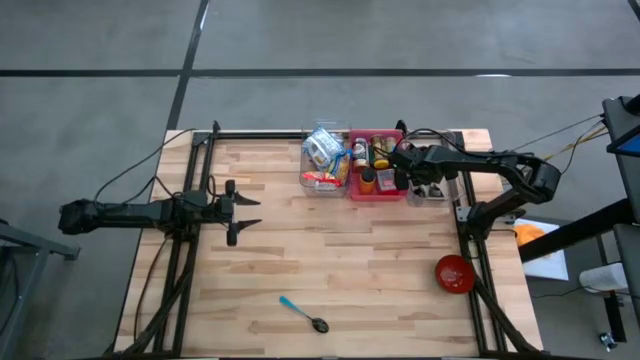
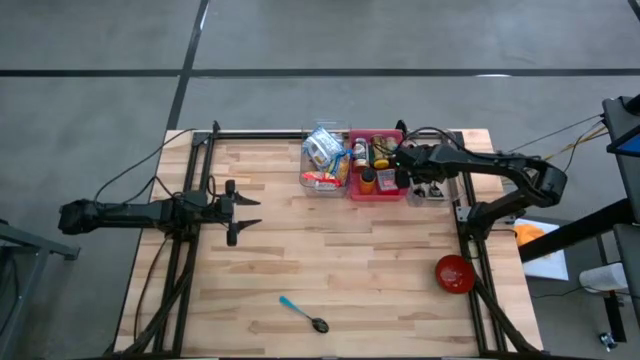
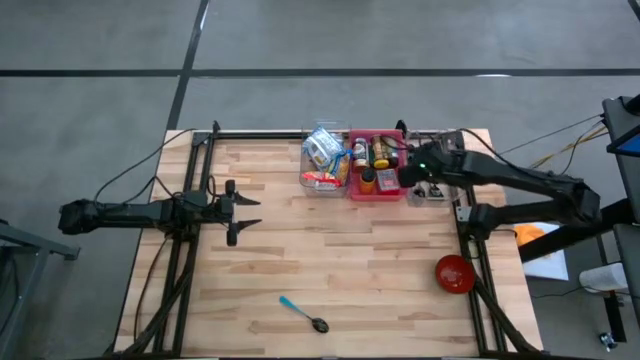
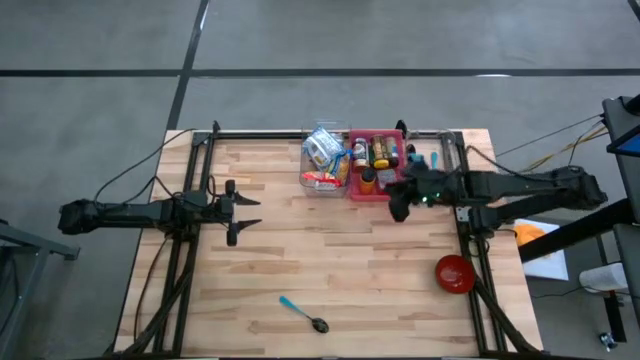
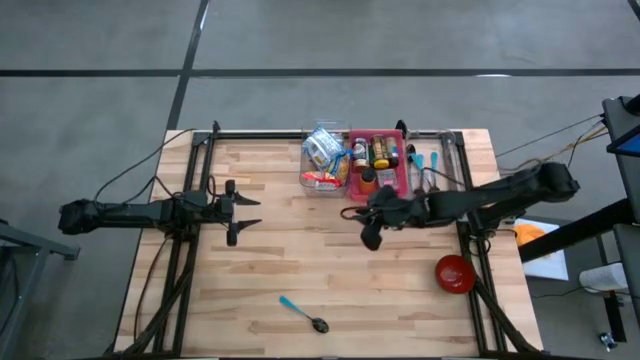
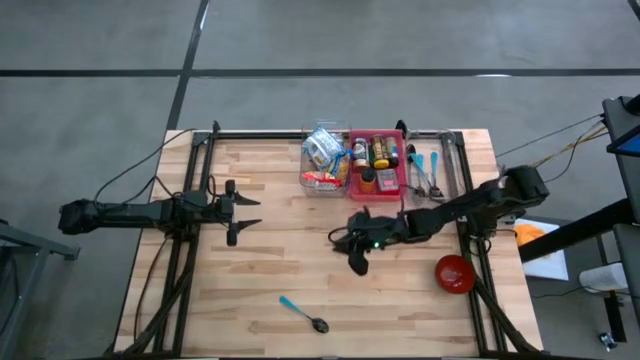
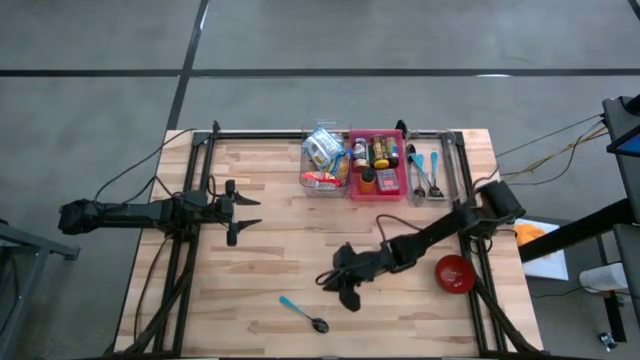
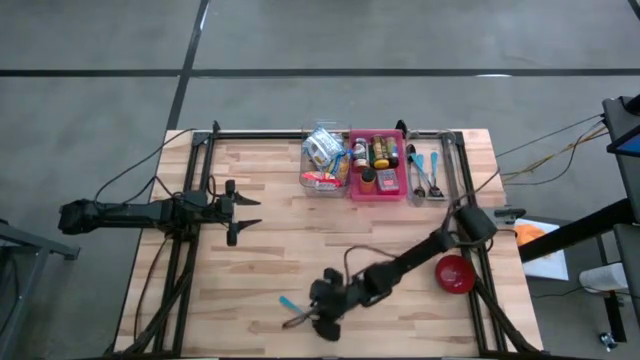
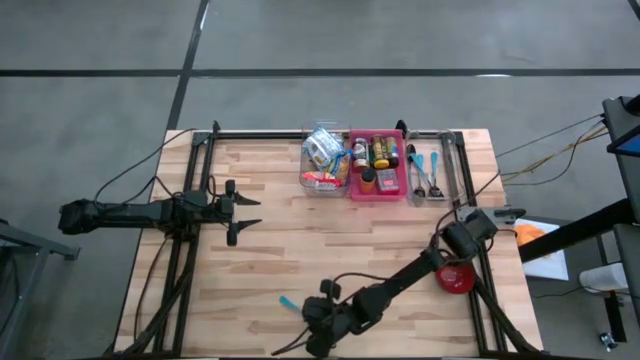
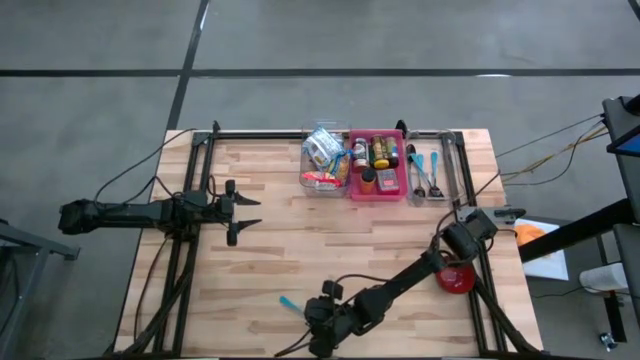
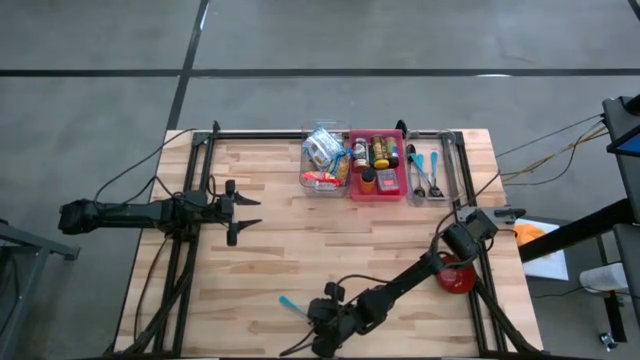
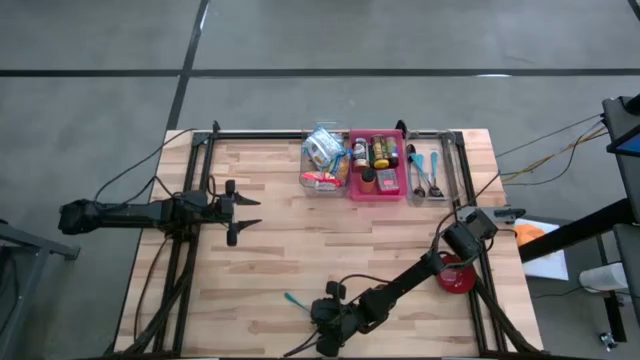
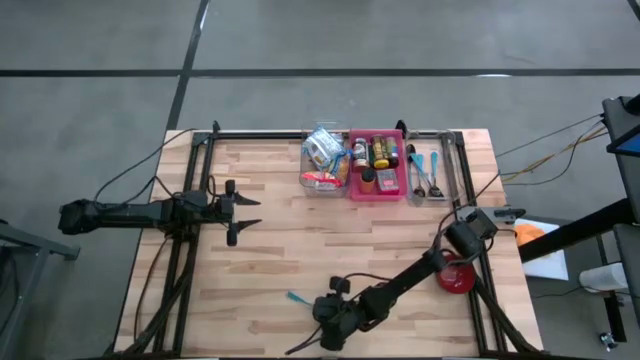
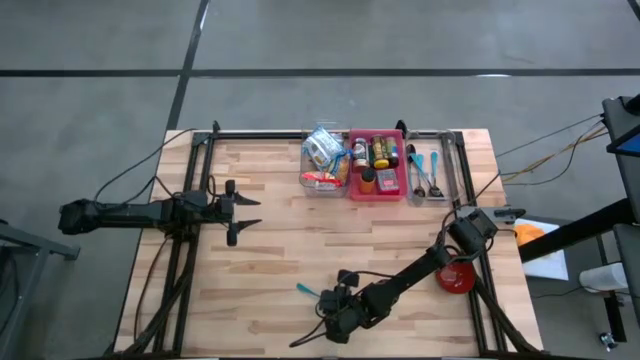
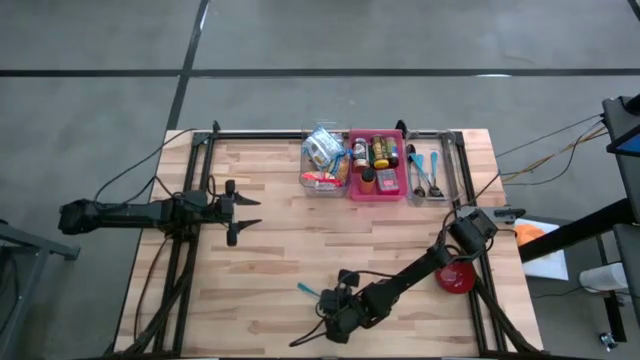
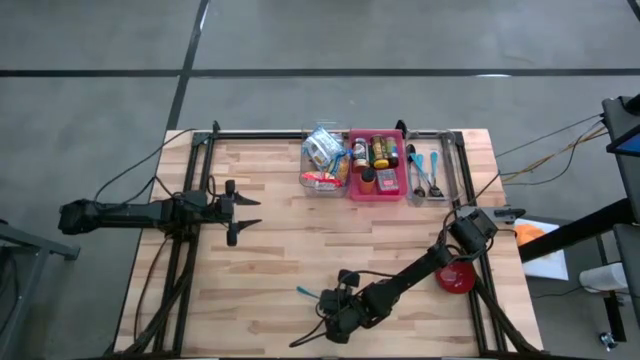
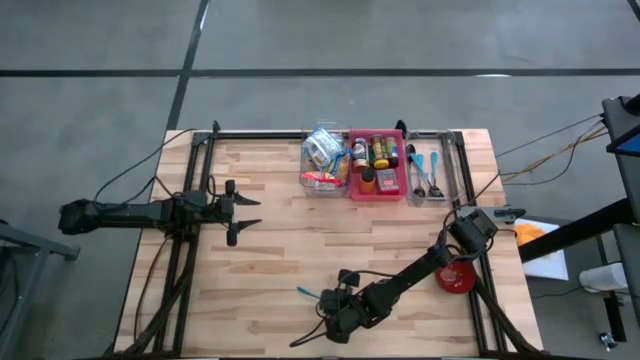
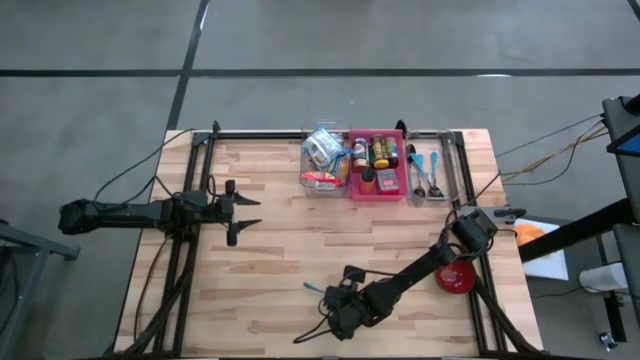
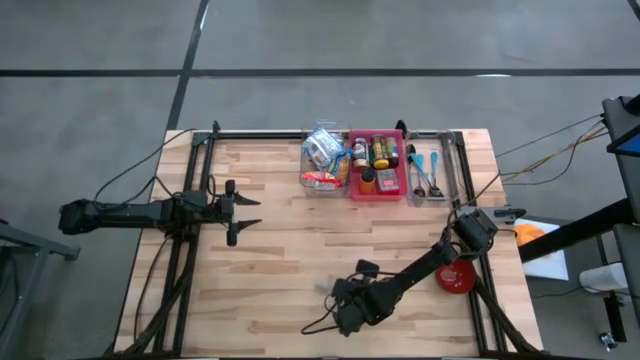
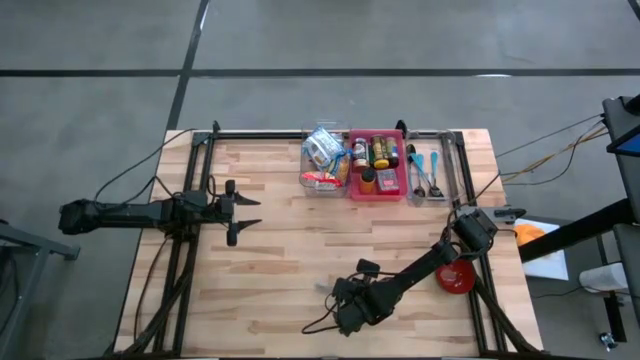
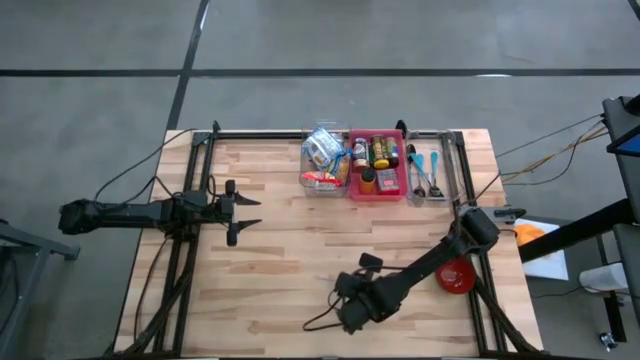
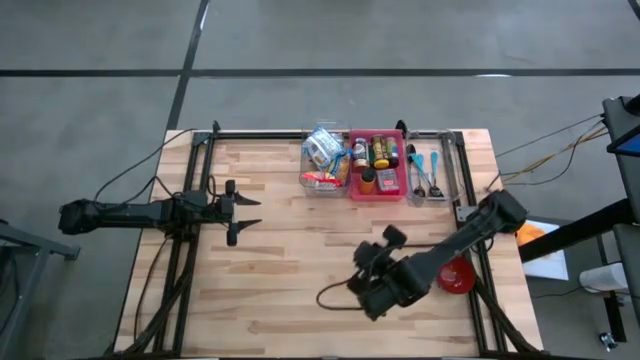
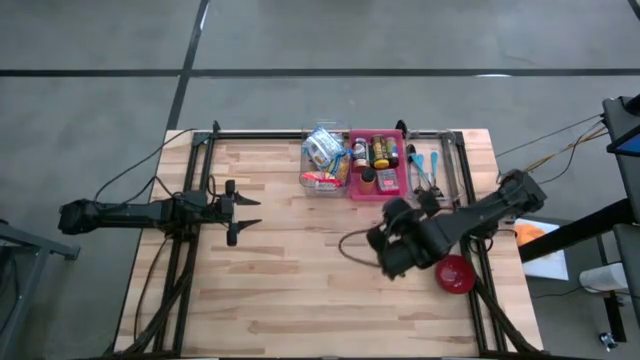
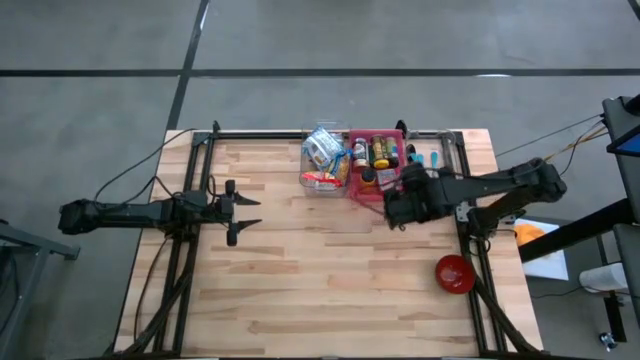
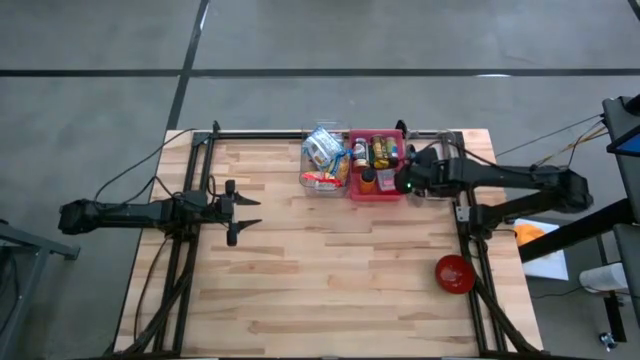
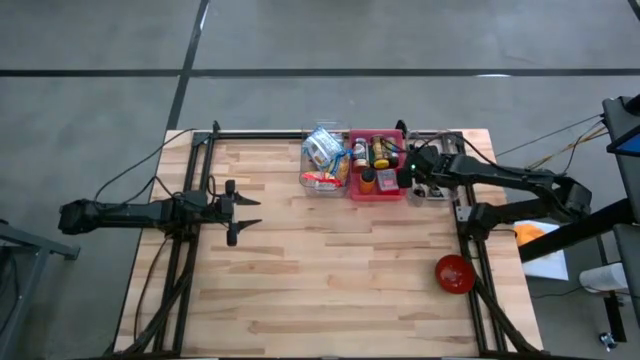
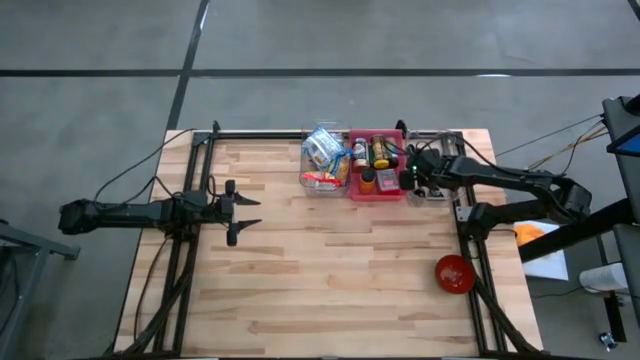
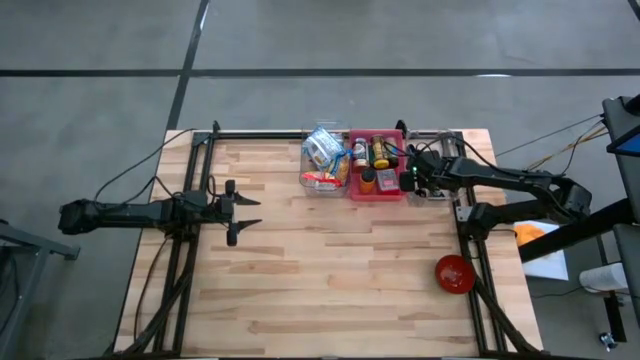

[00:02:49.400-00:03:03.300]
Put the blue spoon into the right transparent bin

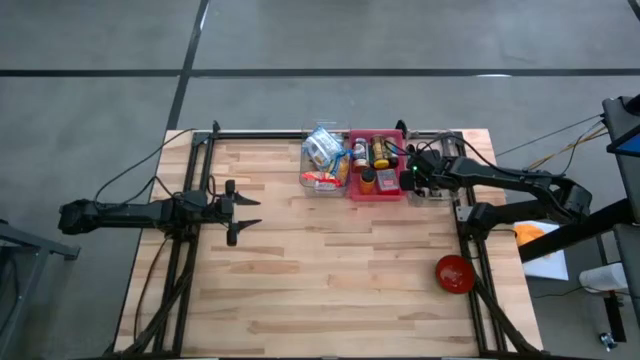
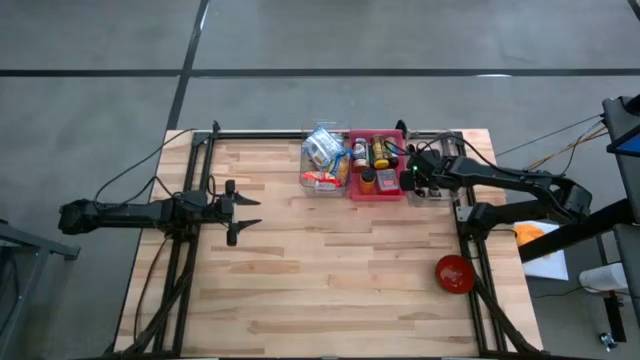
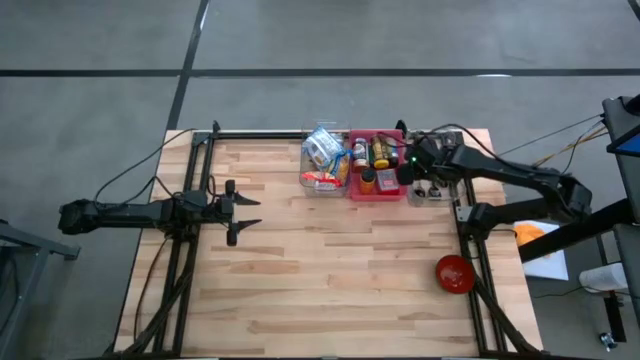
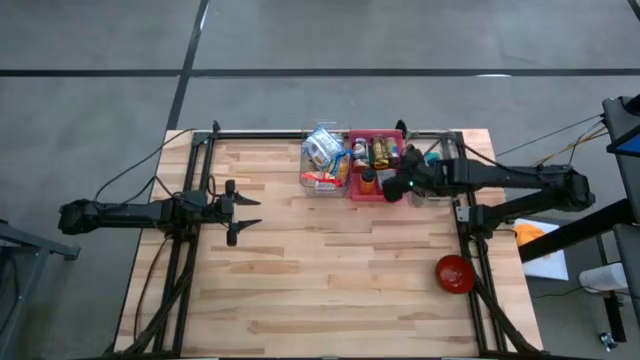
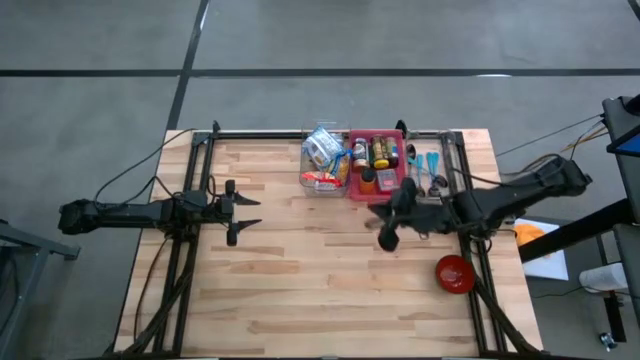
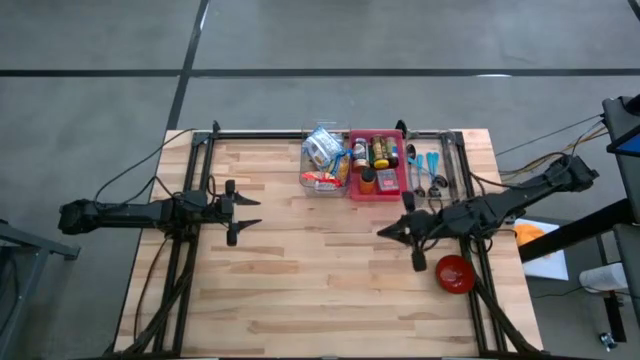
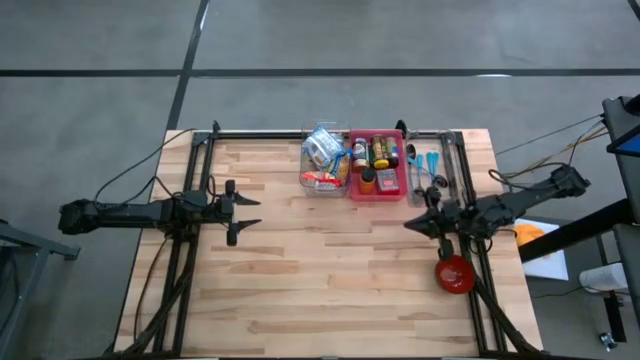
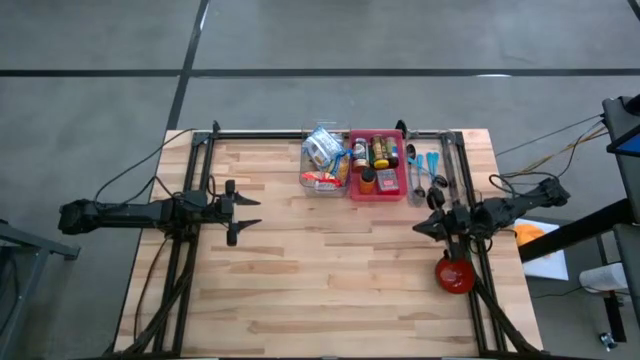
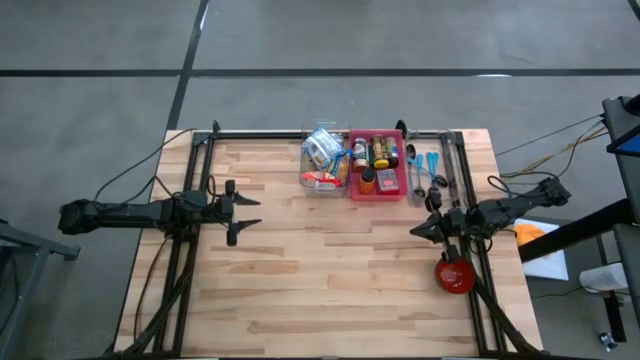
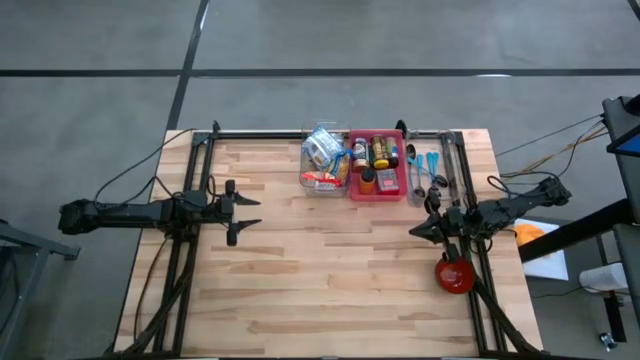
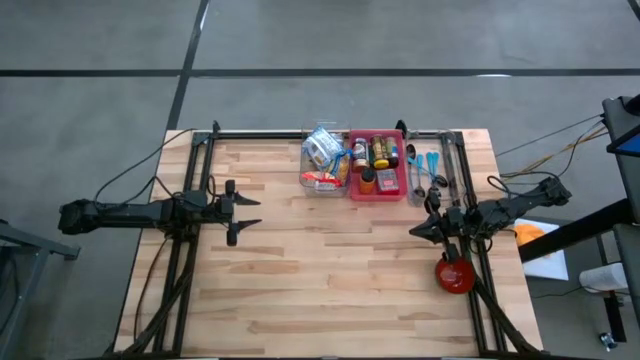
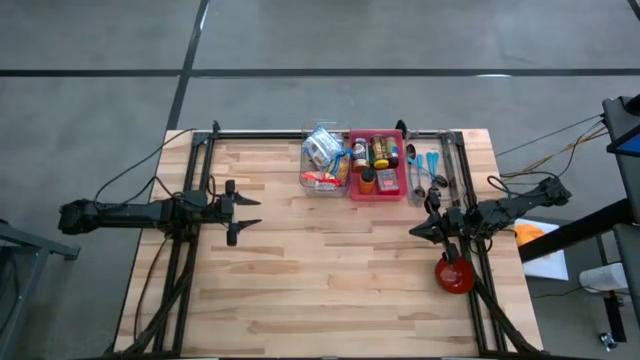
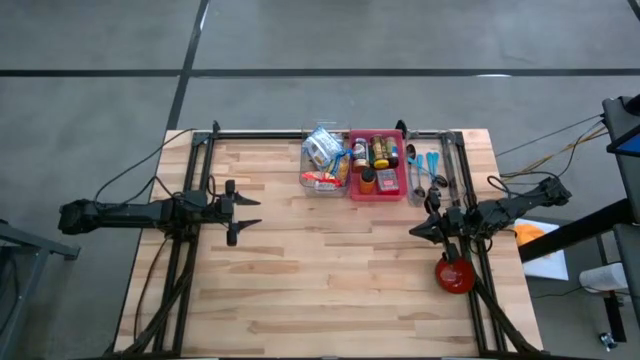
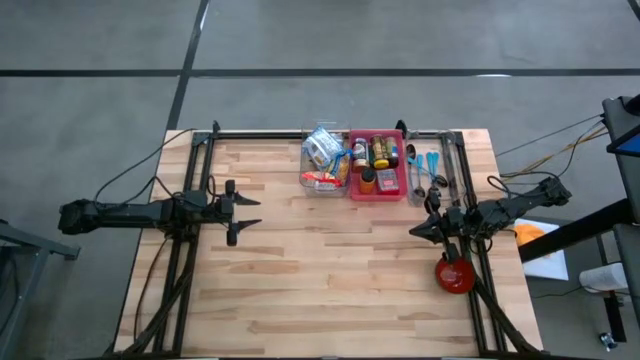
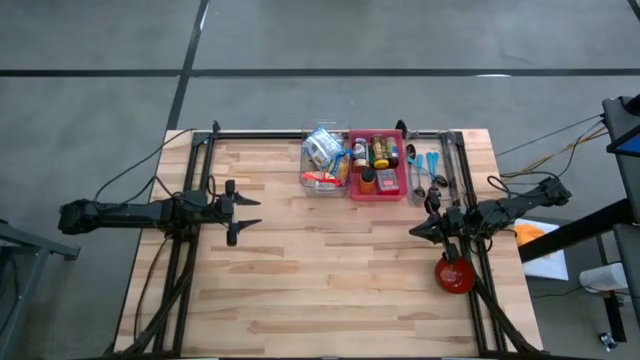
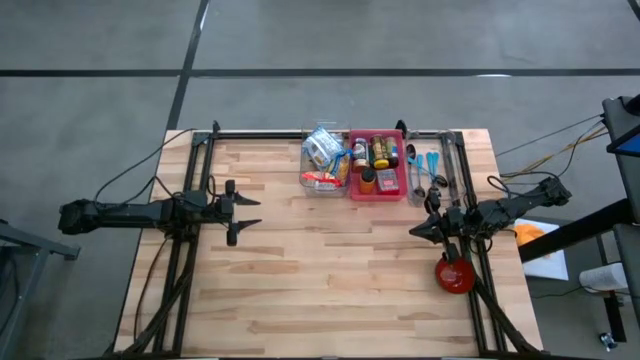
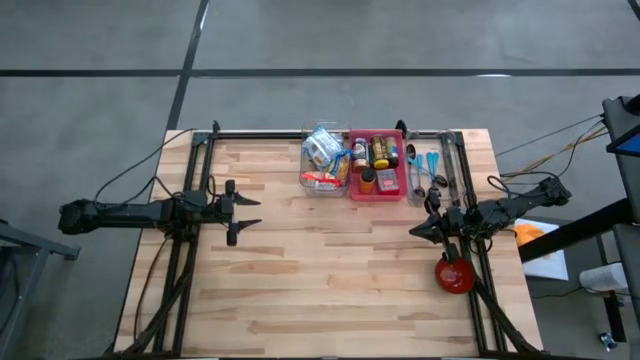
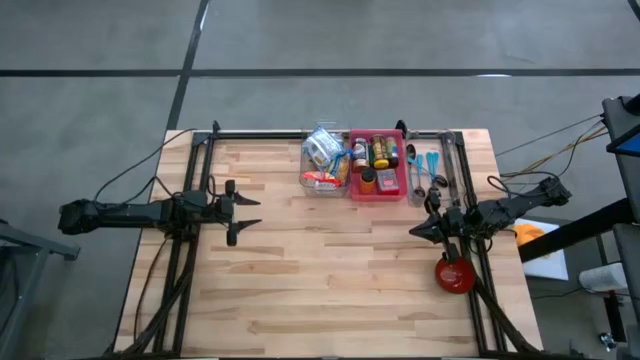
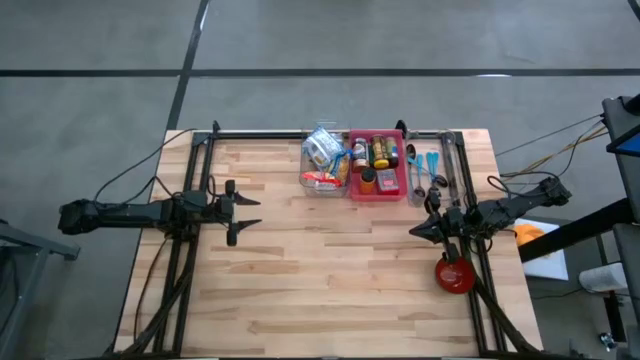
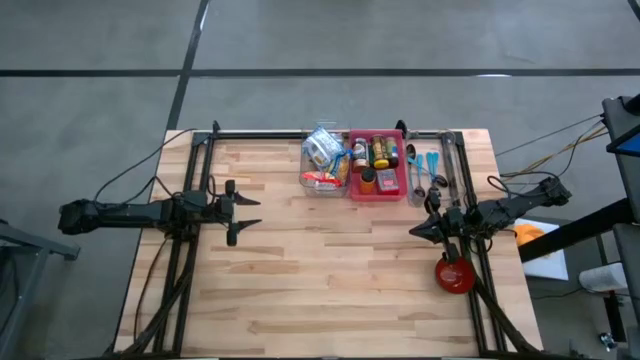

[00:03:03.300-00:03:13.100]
Return to Home Position
